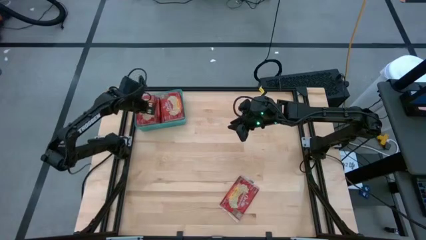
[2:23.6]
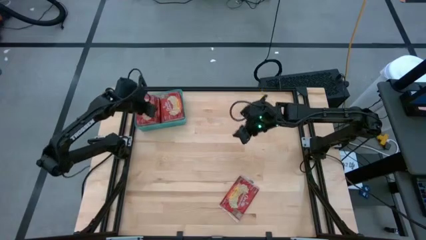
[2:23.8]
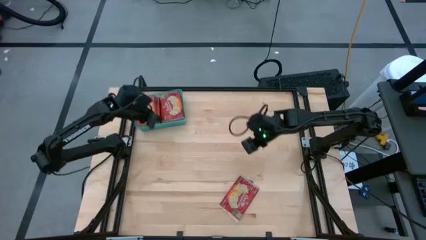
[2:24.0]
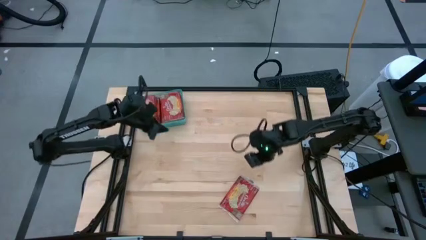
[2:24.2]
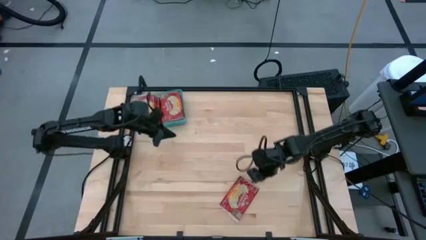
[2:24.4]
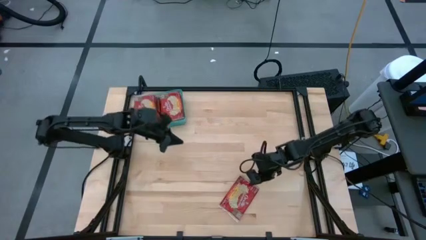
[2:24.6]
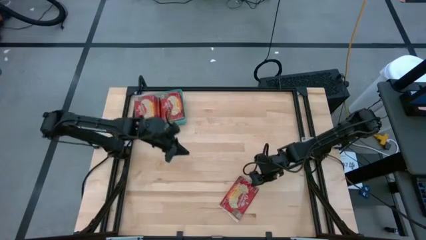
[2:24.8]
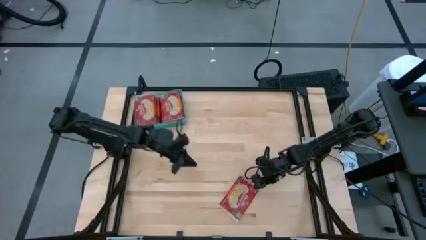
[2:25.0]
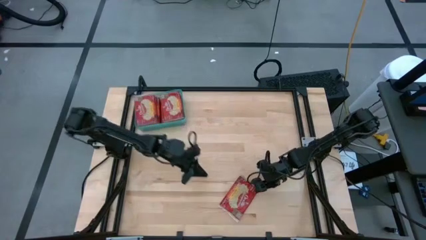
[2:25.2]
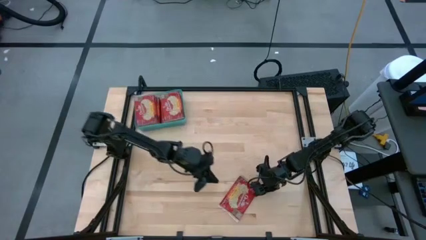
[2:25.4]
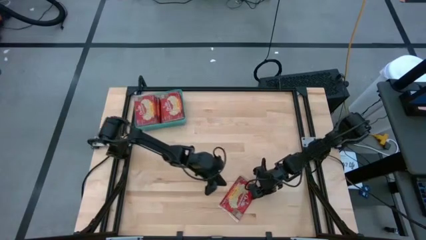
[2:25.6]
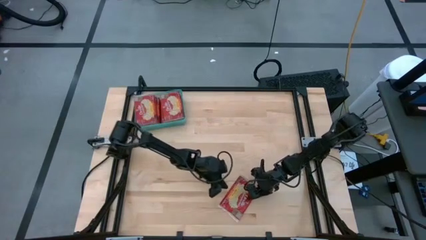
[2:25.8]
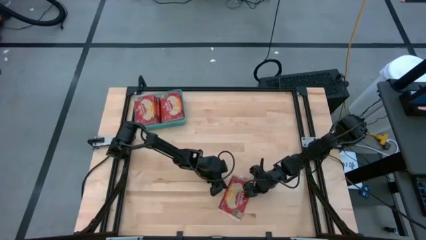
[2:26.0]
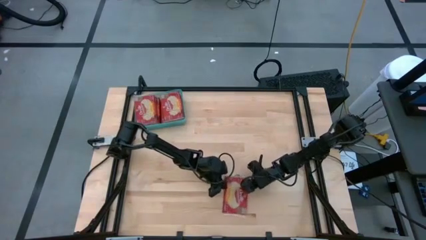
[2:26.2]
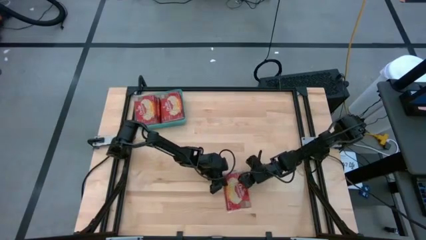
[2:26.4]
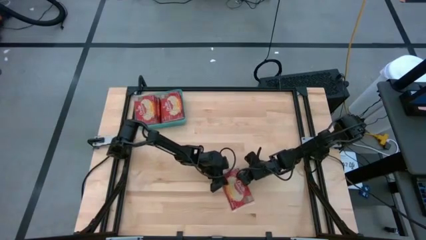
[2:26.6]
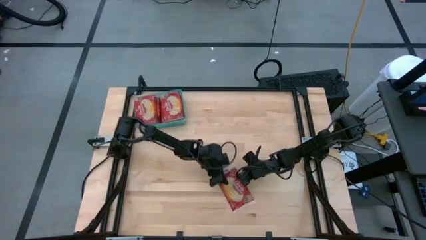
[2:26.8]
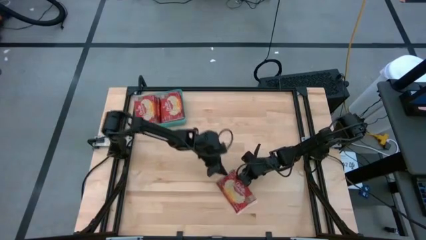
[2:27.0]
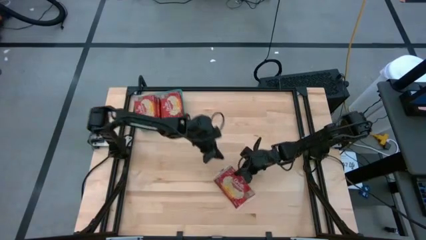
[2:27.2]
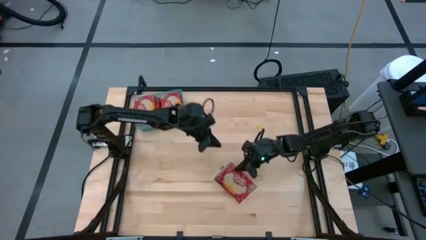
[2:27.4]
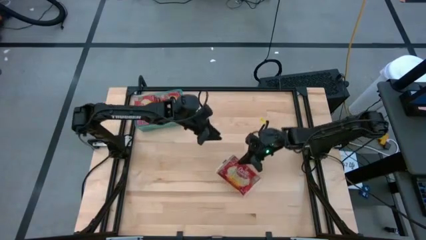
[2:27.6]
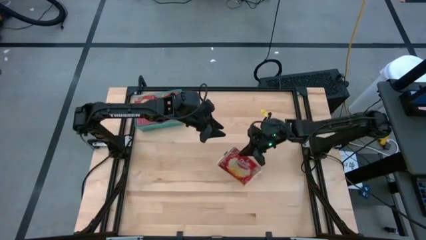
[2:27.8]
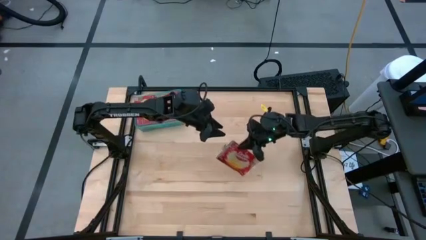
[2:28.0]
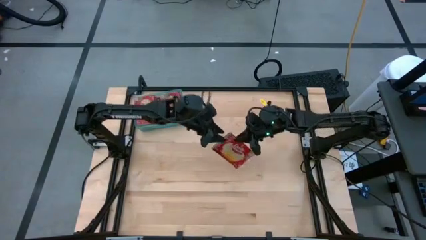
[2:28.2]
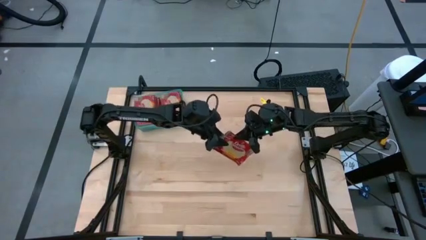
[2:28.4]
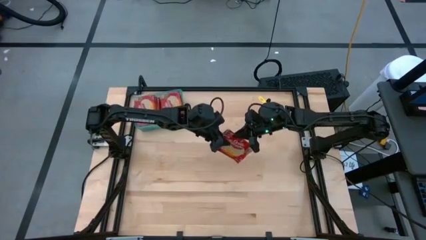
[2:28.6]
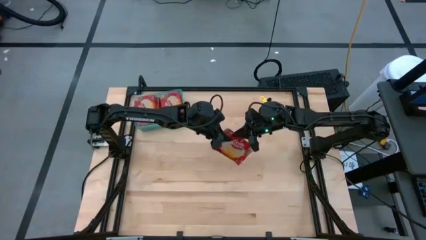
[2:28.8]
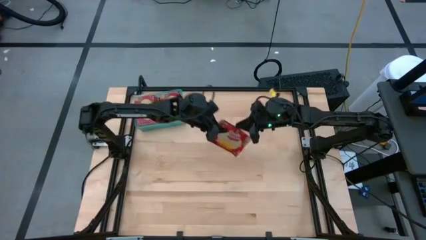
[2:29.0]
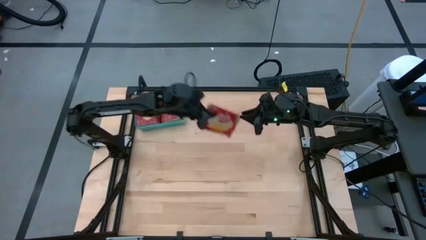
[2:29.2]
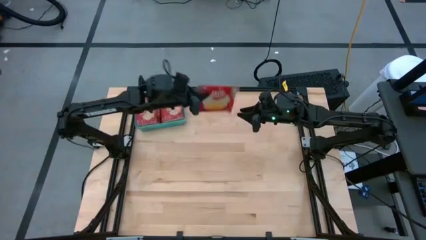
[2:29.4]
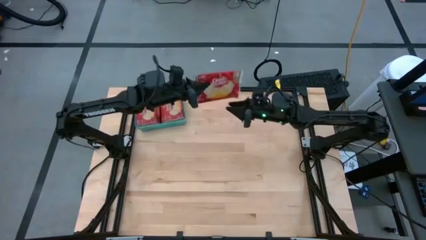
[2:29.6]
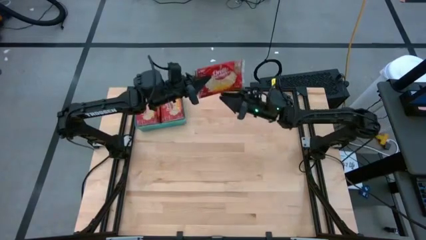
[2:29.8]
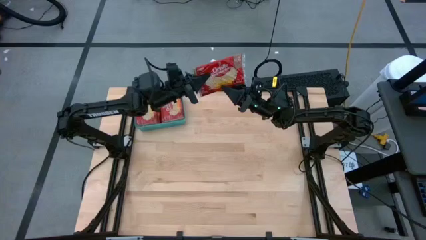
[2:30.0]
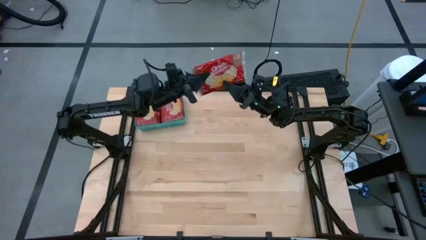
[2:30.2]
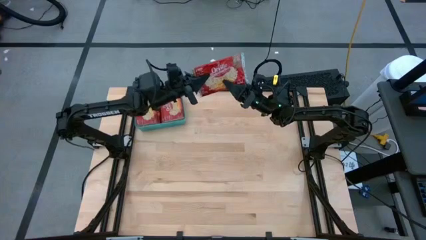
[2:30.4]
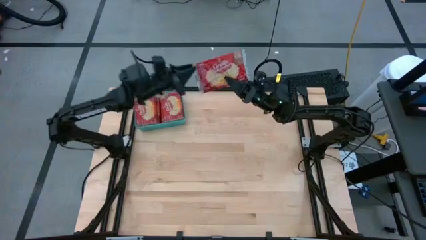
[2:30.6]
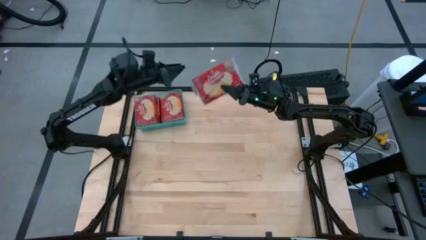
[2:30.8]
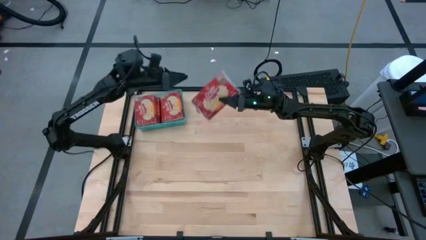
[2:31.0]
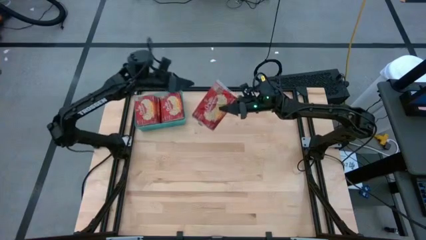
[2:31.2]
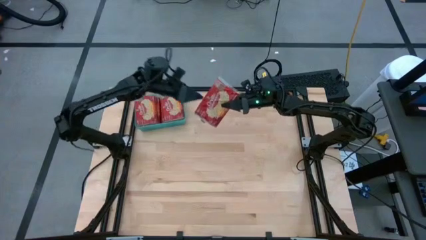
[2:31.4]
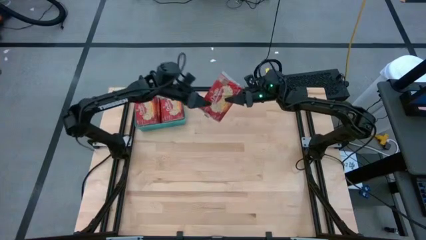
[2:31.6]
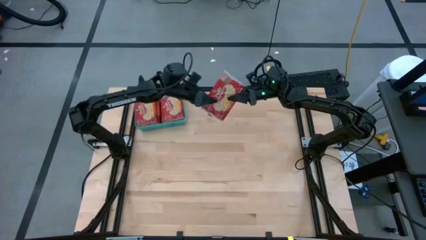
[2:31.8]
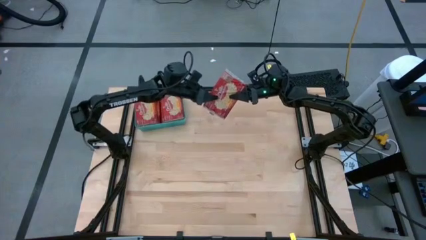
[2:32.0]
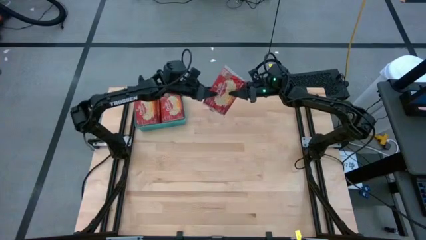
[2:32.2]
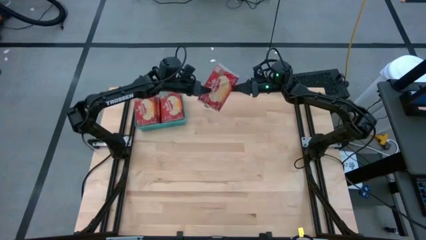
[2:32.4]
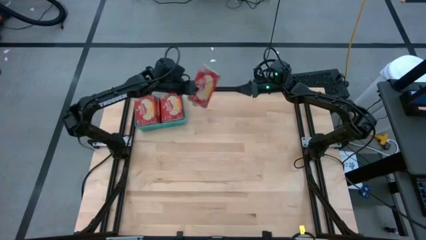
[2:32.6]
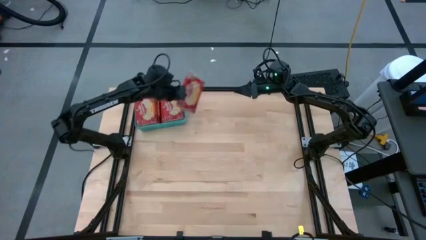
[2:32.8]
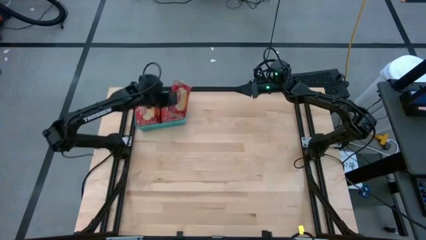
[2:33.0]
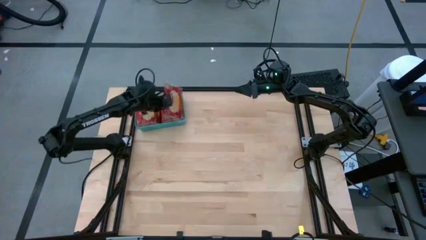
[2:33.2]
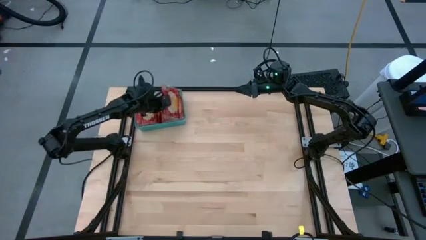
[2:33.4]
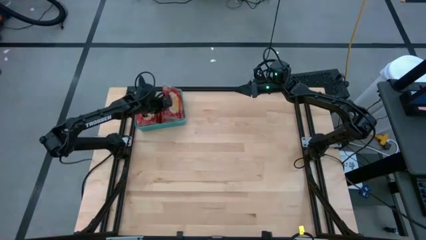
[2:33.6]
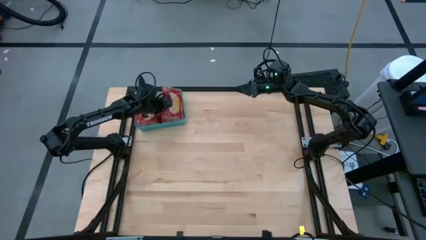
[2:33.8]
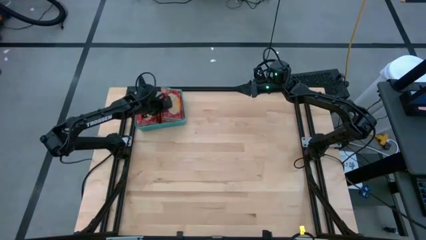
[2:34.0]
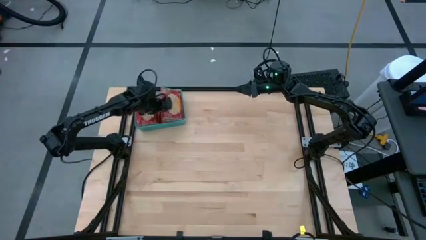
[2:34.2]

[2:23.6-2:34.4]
Task: Sort popcorn bags into baskets
Put the red popcorn bag into the blue bin

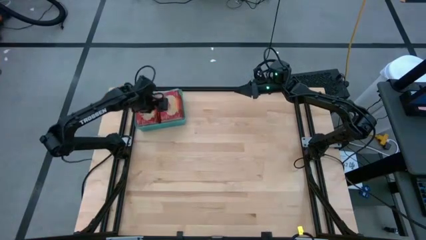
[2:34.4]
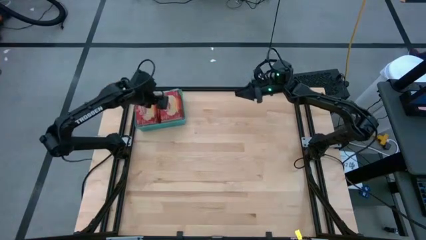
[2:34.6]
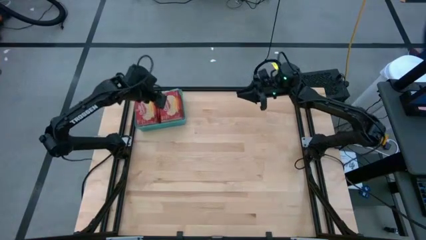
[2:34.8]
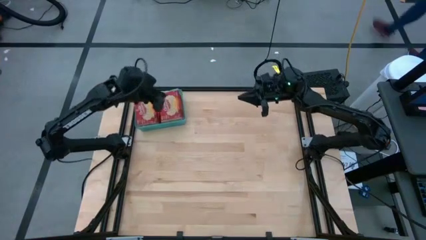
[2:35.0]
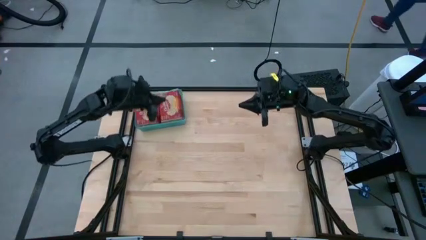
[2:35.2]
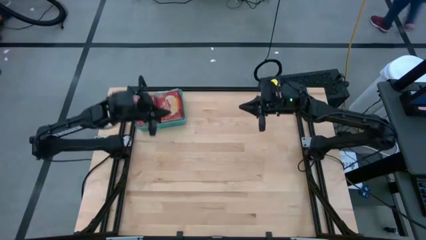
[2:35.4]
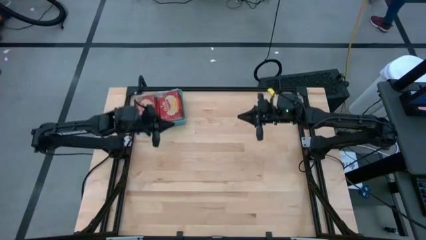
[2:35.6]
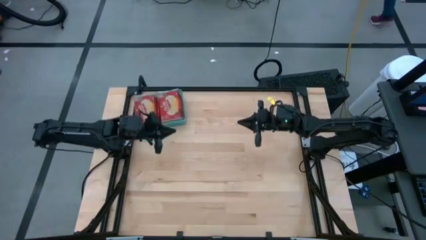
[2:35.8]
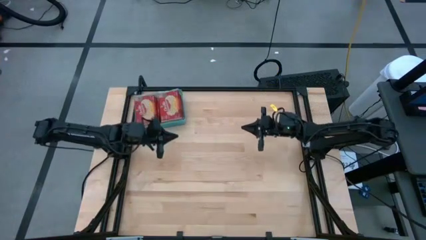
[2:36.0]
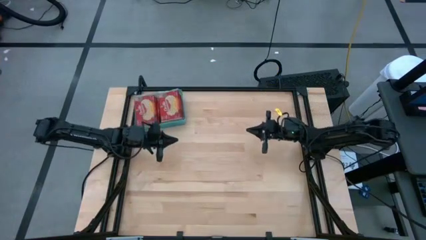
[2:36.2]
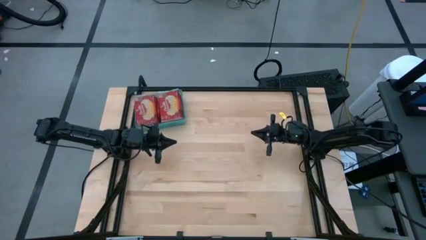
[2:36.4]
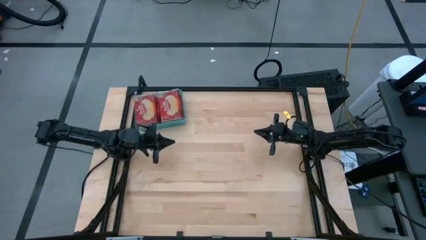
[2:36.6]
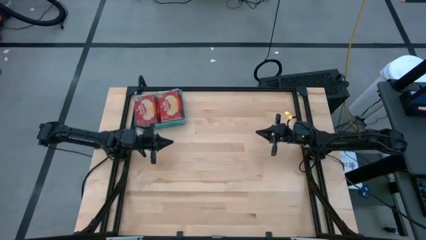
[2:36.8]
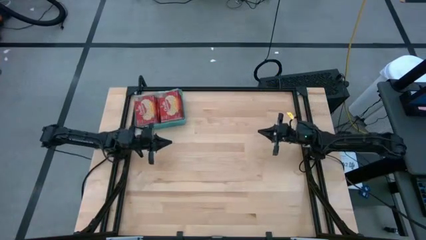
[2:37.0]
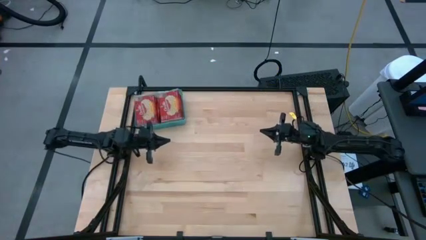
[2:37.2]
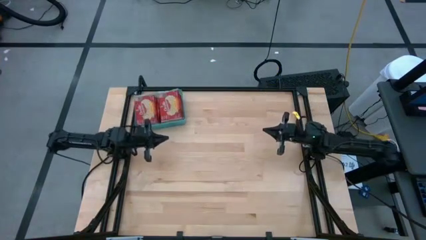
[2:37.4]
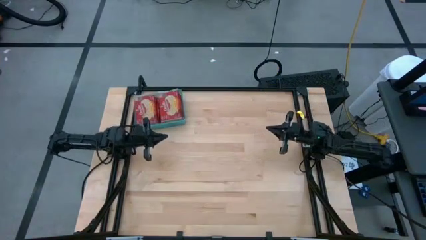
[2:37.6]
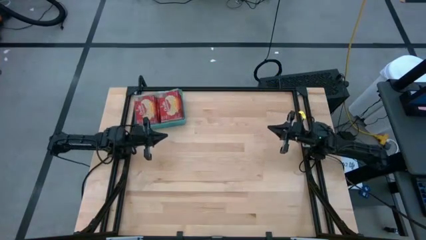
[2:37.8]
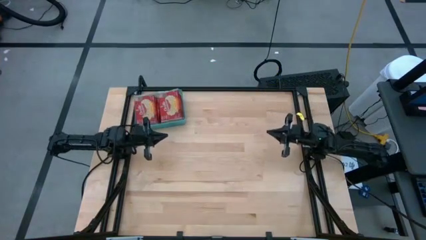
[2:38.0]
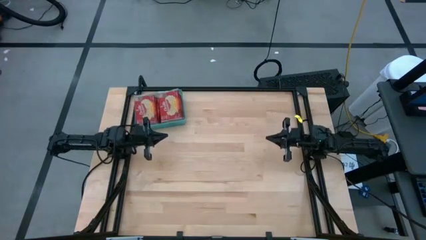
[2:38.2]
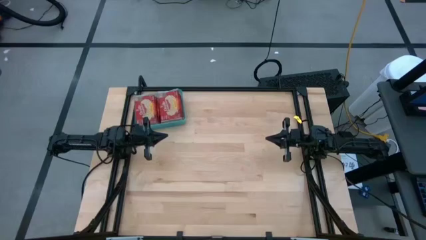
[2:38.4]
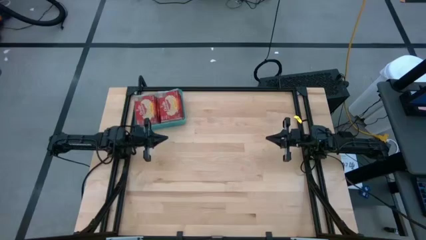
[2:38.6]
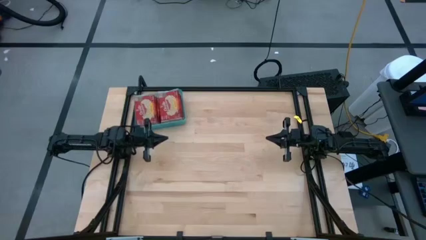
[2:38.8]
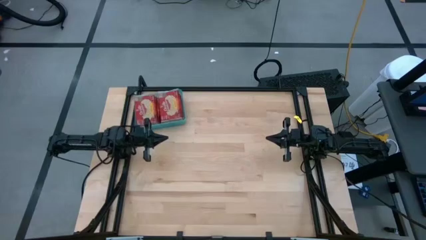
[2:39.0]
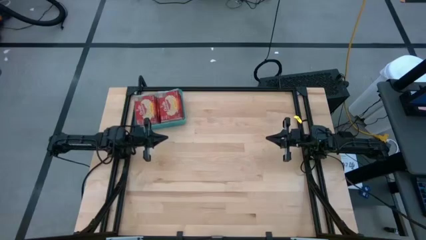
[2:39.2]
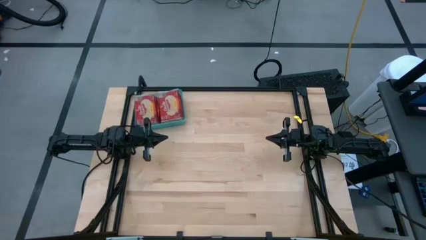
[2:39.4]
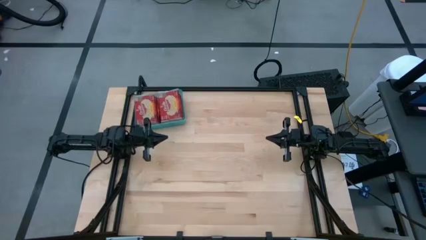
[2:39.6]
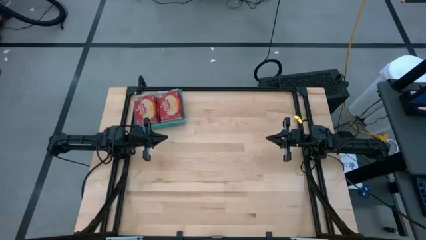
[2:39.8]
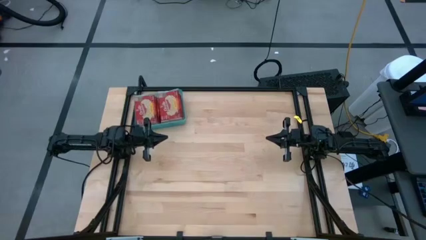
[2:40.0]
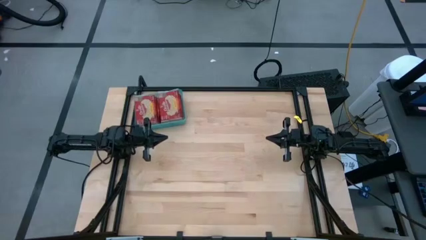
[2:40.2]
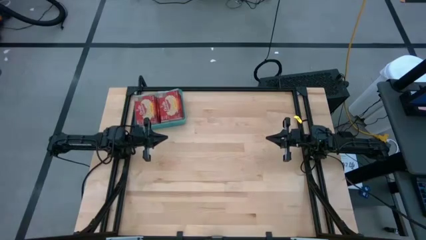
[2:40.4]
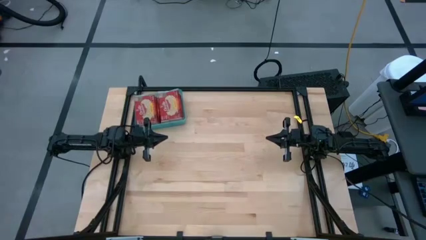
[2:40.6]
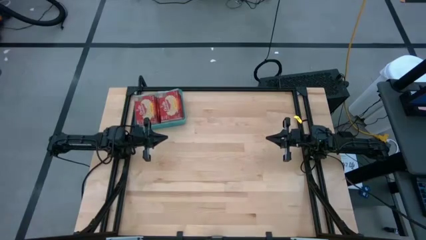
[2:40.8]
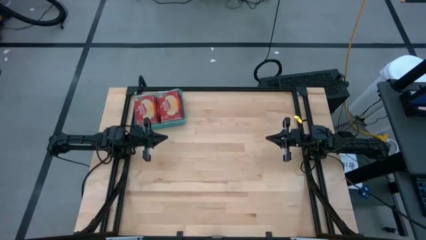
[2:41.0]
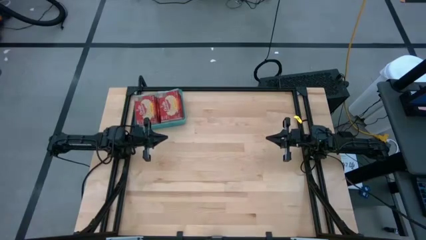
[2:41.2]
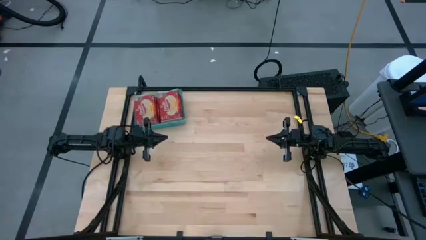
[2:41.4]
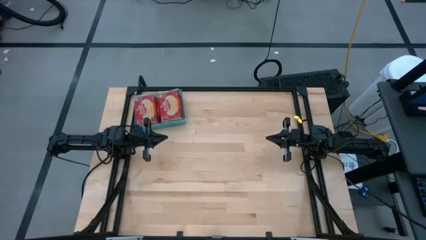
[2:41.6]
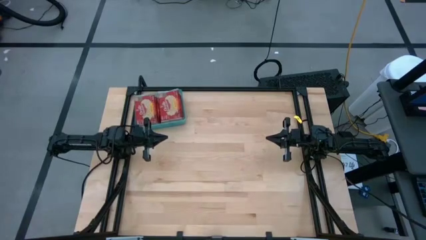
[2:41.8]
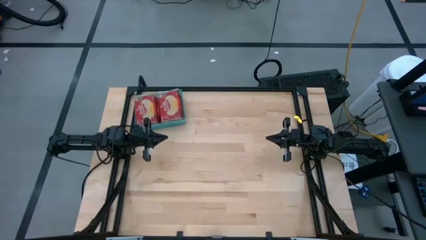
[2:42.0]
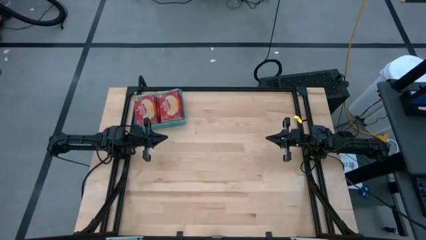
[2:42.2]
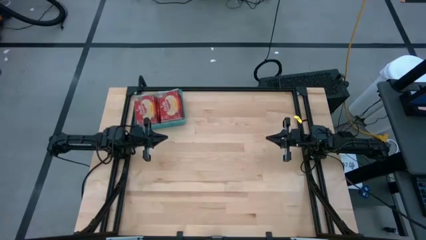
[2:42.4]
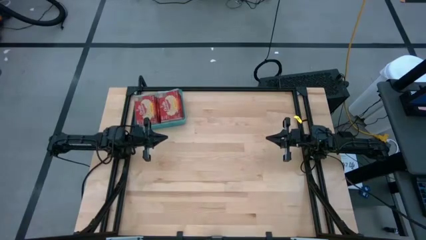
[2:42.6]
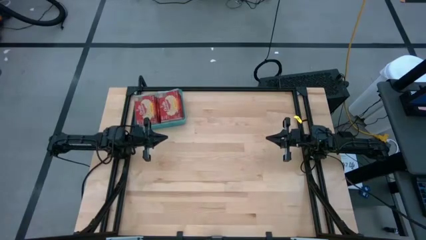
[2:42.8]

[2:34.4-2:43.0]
Return to Home Position
